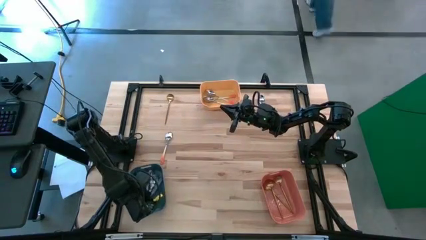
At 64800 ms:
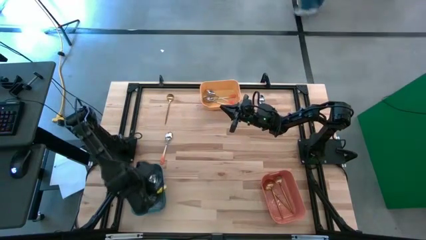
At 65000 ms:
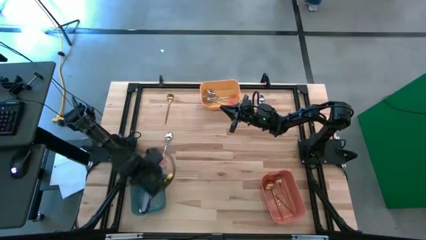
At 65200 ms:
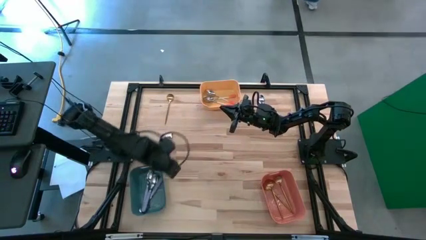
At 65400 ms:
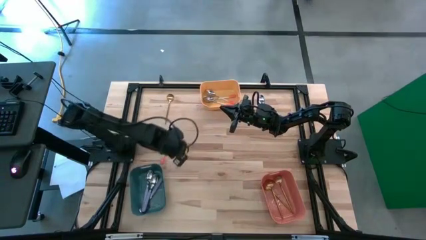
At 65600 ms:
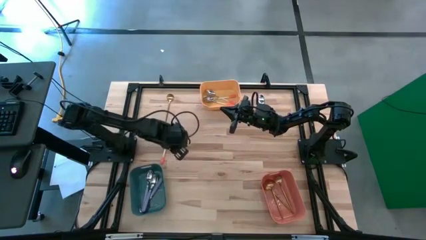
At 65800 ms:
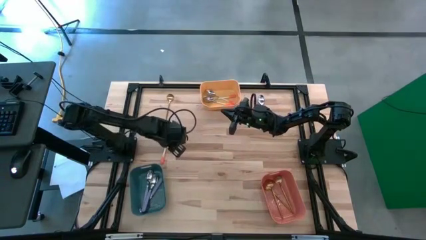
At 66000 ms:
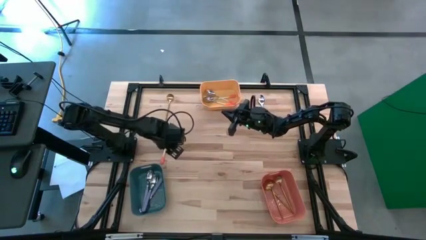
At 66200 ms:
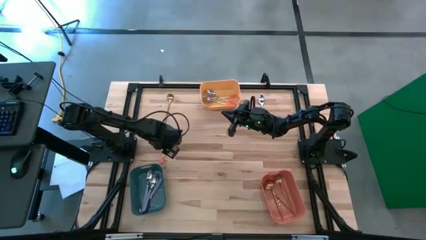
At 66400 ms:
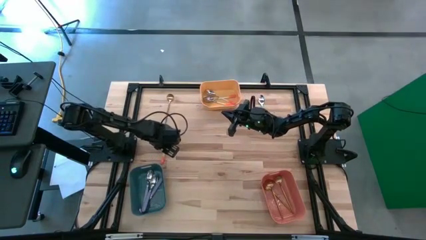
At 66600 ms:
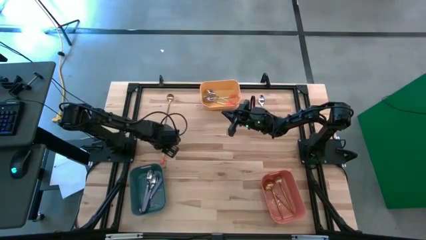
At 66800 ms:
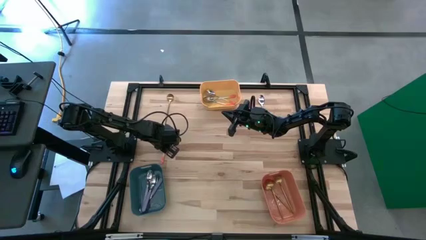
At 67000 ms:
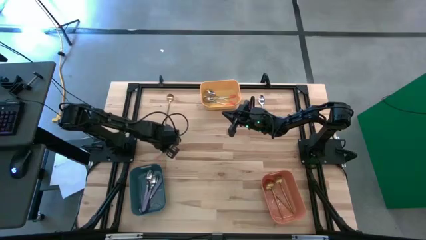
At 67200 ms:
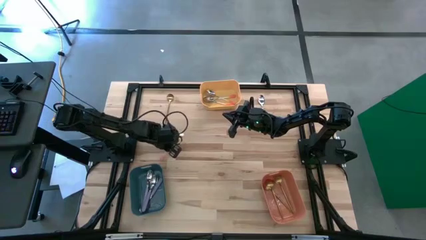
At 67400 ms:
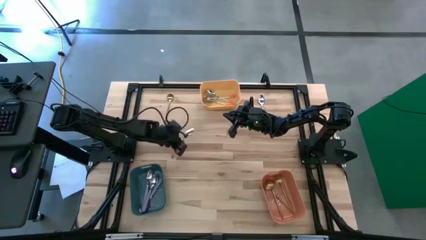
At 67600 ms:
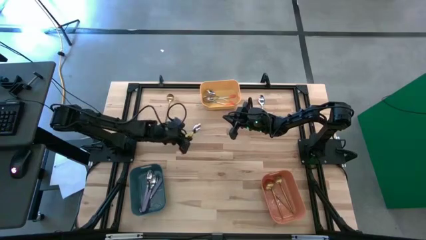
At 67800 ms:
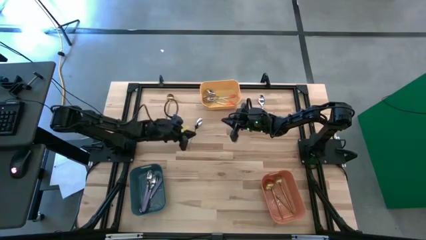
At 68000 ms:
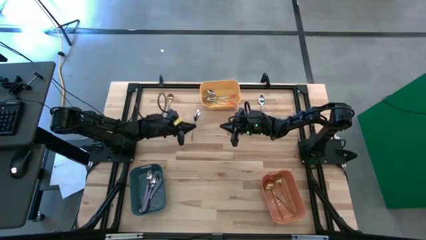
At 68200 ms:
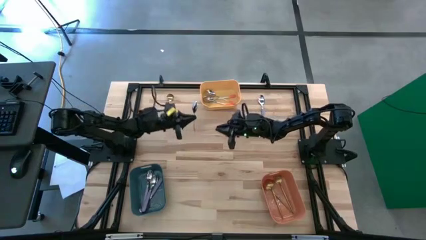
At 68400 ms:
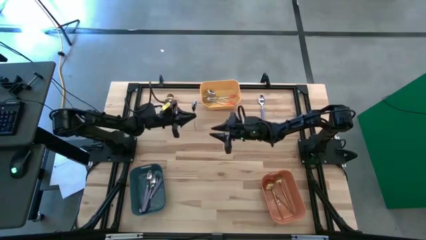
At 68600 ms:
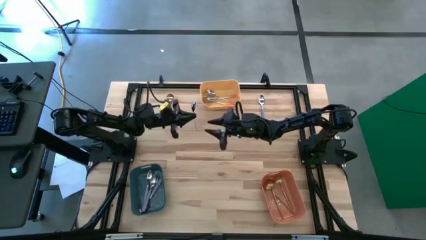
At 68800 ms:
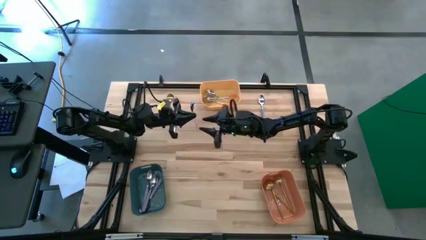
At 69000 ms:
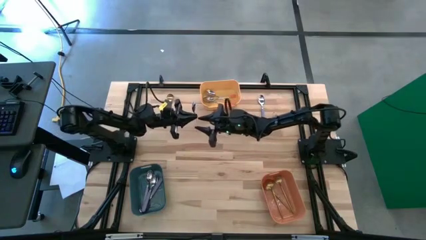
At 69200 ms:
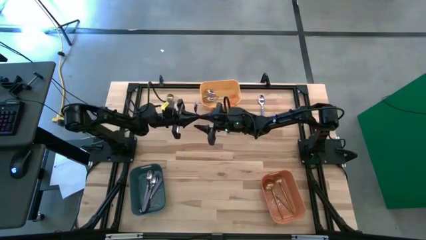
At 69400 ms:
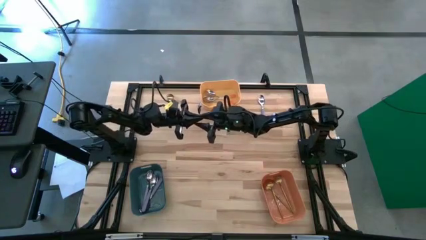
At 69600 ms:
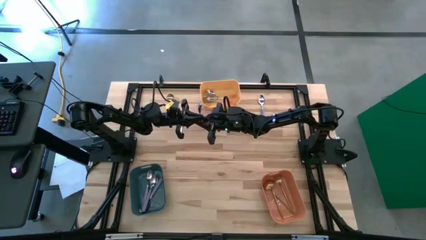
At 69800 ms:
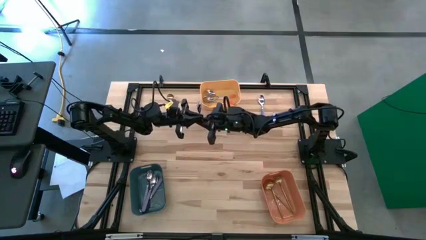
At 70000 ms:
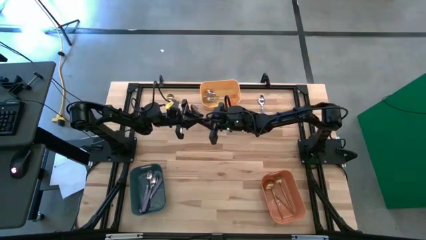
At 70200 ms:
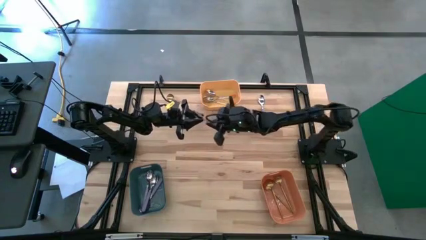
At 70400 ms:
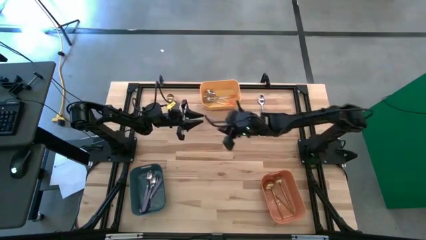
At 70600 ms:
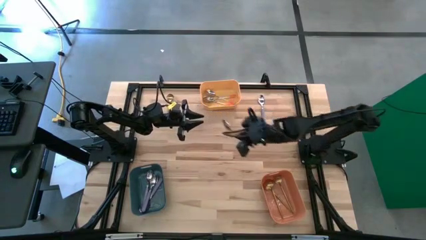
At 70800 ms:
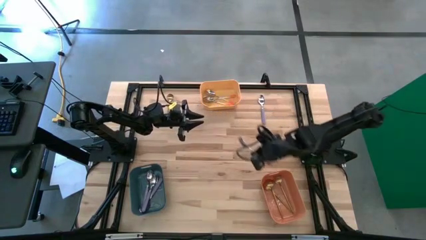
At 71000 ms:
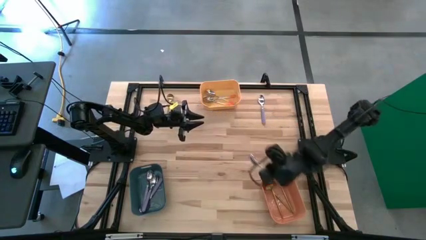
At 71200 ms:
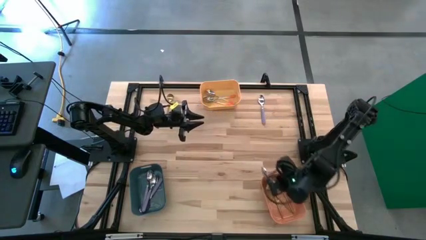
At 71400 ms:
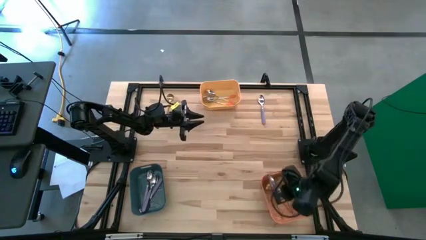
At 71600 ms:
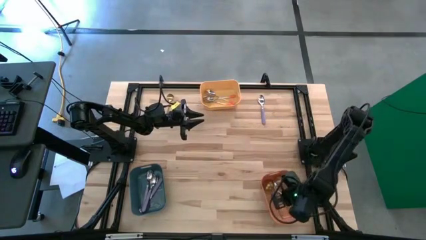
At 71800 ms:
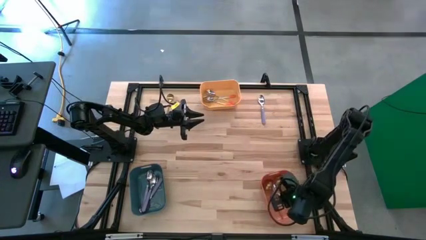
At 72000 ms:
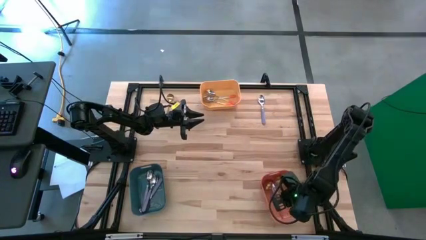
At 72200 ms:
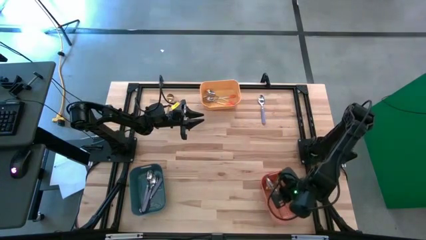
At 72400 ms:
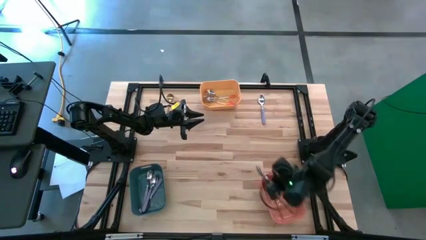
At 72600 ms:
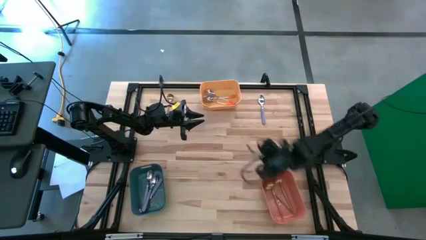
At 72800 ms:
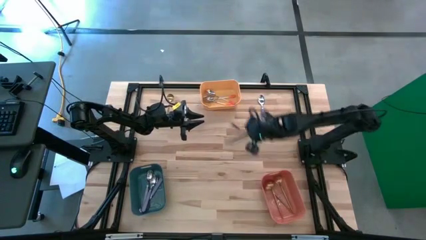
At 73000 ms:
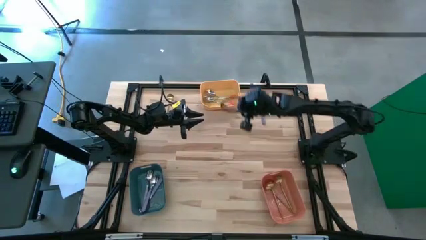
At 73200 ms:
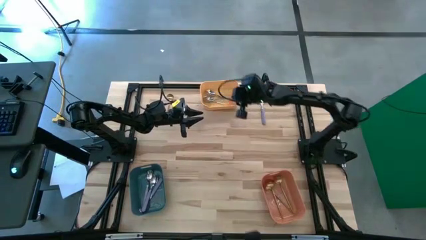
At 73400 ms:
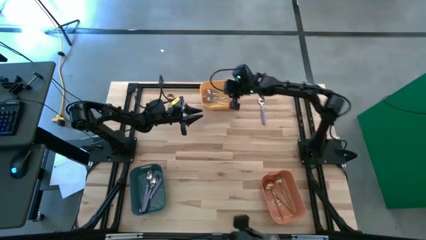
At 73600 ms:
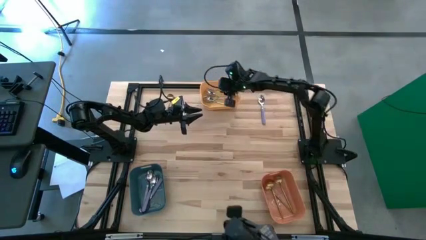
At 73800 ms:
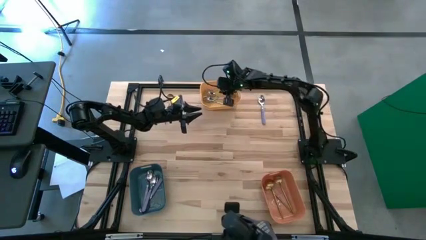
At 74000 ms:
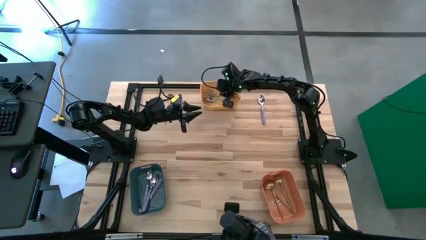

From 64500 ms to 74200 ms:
Task: Sort silverware by color (type)
Put the orange spoon into the yellow bin

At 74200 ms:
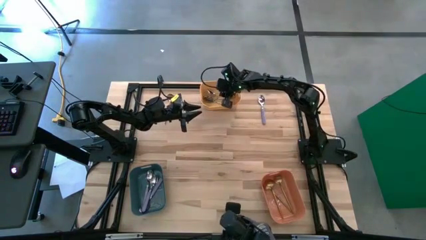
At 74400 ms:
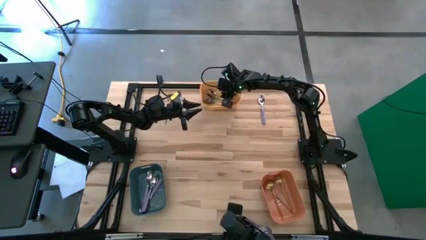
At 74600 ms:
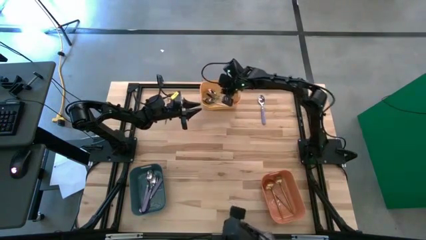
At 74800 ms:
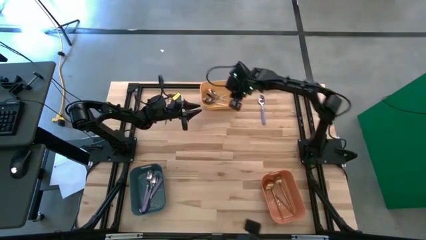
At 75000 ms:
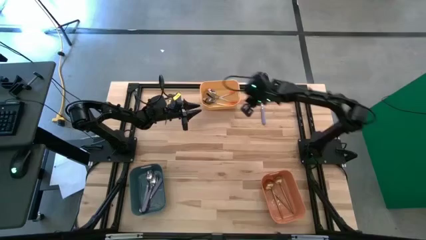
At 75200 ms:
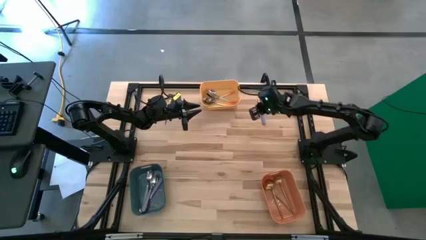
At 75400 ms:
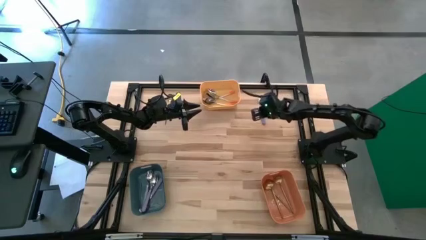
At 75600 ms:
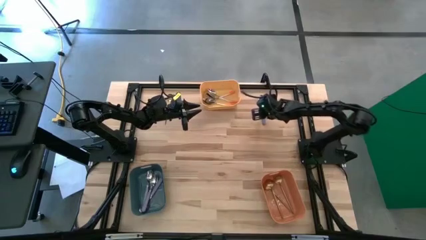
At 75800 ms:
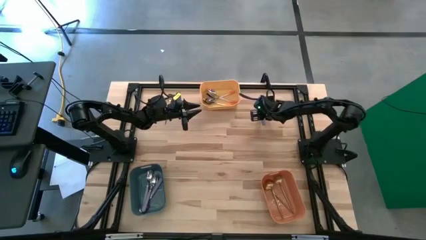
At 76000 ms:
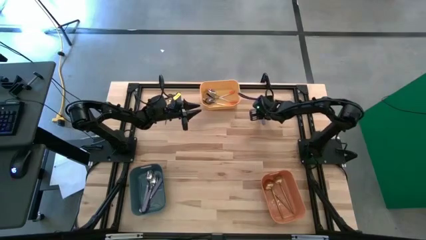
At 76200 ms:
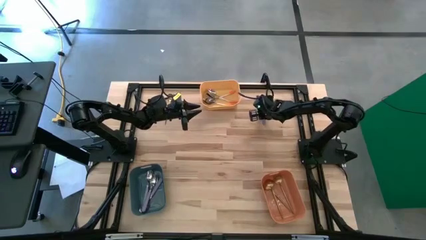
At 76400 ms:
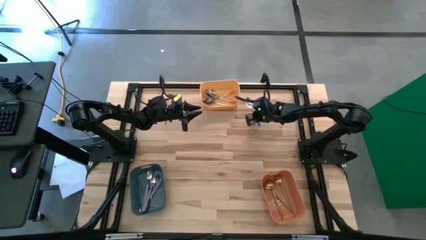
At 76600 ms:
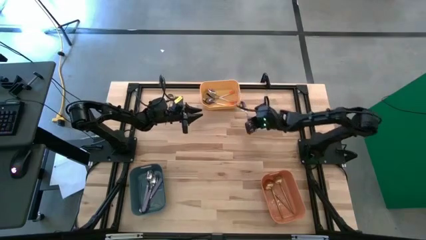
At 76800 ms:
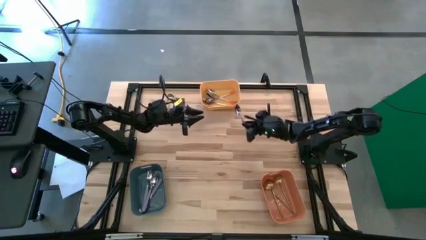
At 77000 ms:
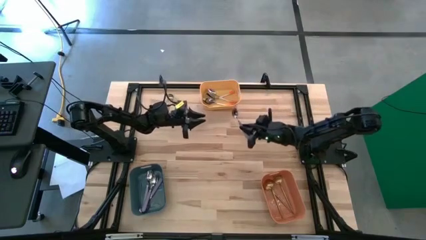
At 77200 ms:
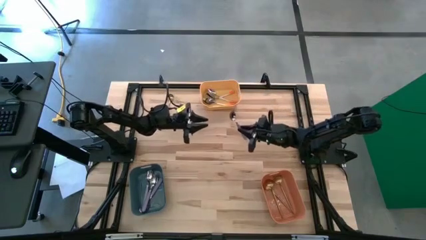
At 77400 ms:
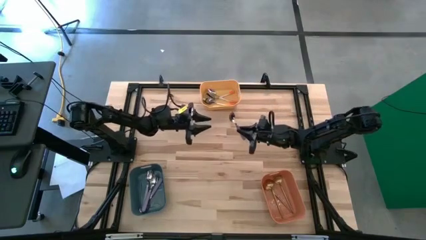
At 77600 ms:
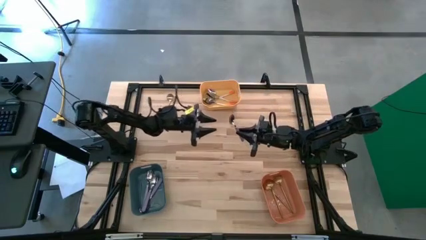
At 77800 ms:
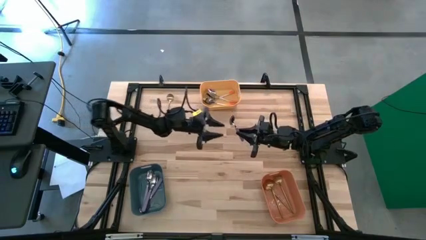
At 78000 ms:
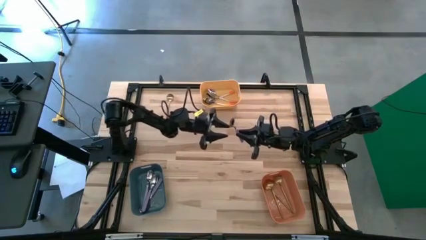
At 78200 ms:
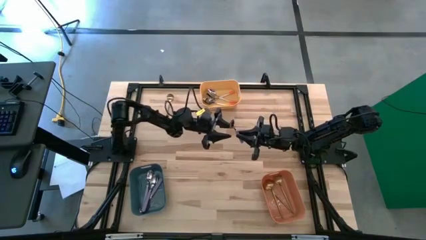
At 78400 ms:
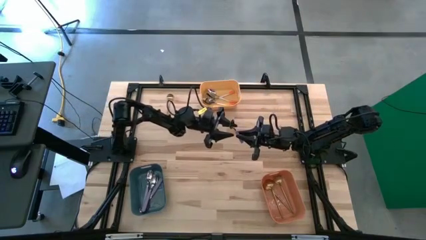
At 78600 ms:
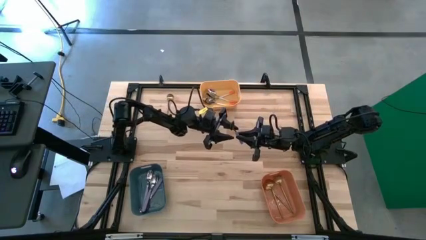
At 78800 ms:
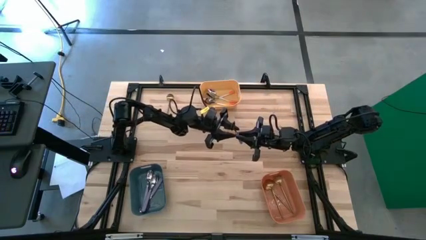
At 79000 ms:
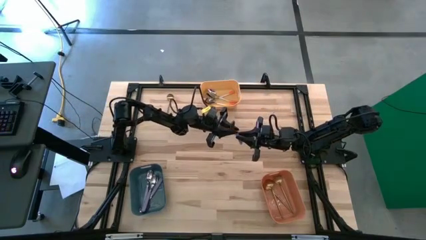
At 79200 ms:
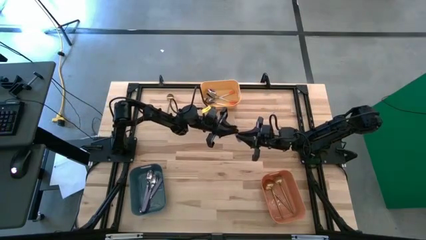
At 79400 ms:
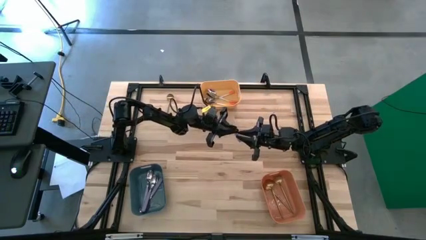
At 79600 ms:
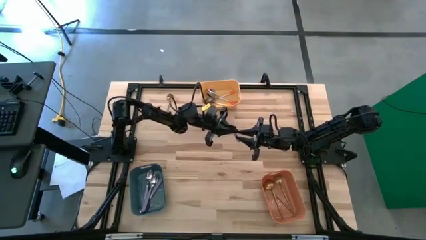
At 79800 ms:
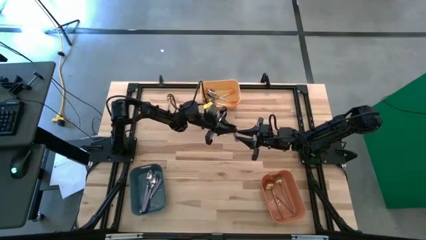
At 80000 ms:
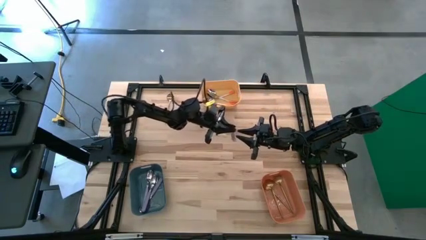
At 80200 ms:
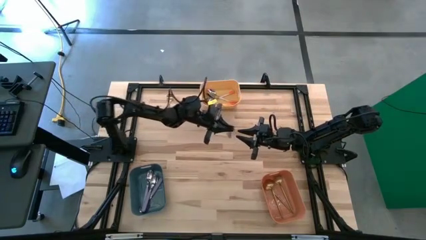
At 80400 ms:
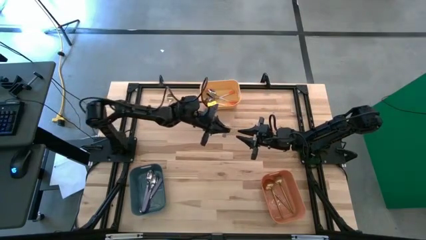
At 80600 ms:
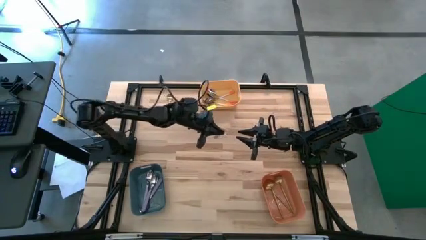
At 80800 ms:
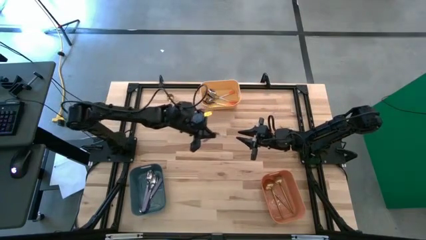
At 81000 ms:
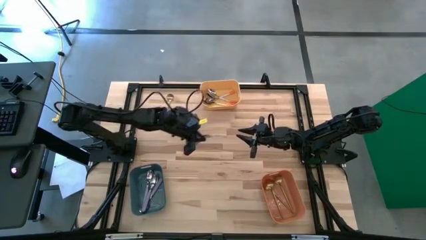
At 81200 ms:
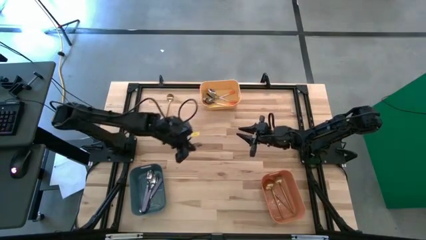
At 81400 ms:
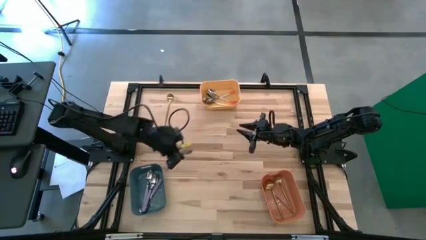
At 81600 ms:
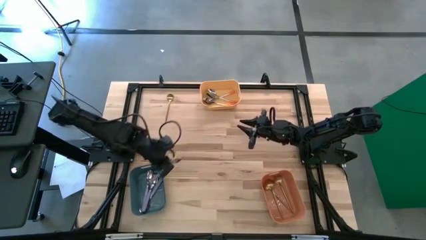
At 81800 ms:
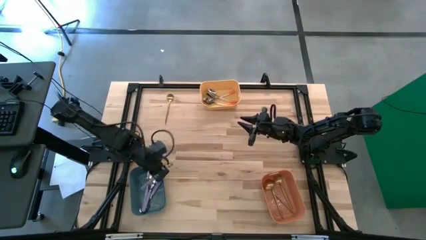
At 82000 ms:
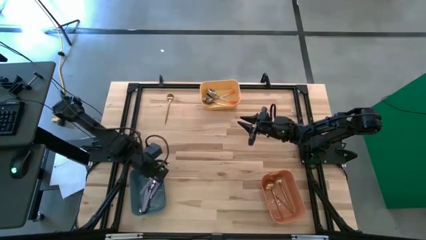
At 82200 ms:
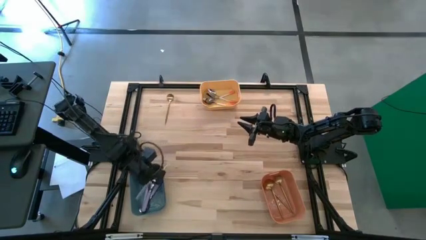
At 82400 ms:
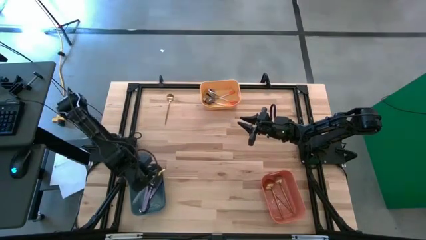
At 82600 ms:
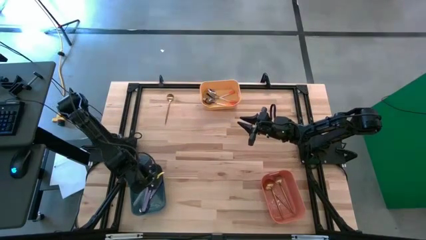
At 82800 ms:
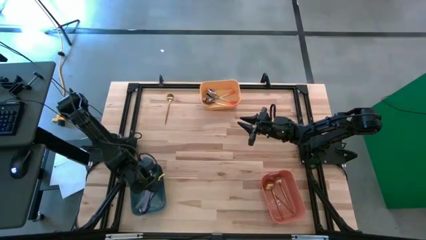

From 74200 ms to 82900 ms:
Put the blue spoon into the blue bin
